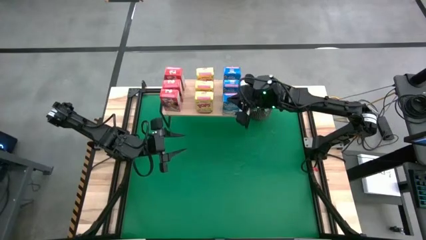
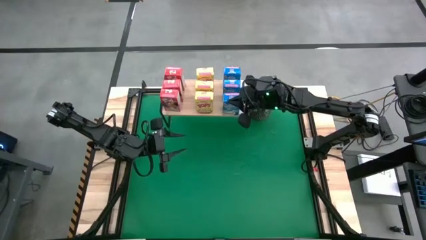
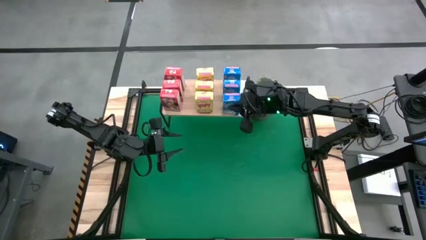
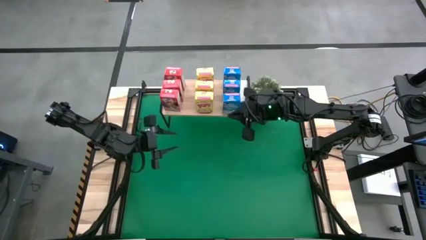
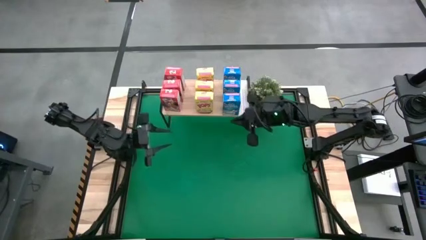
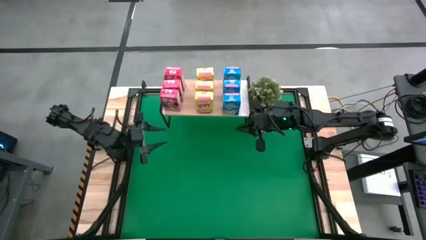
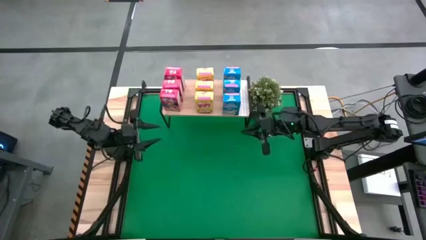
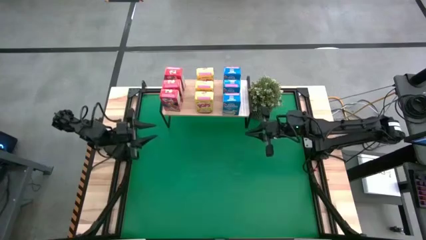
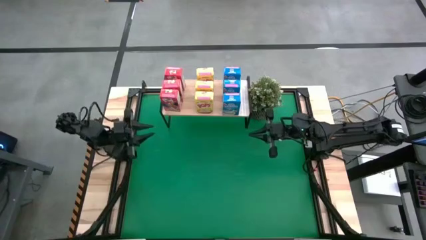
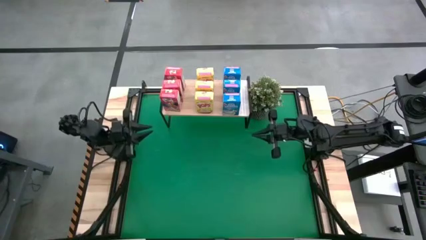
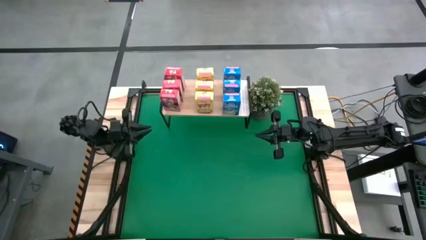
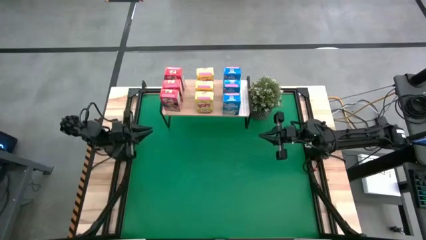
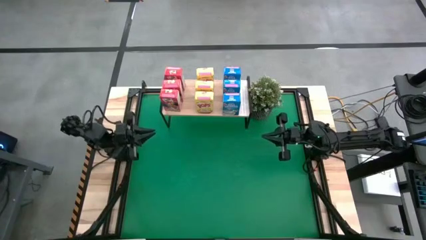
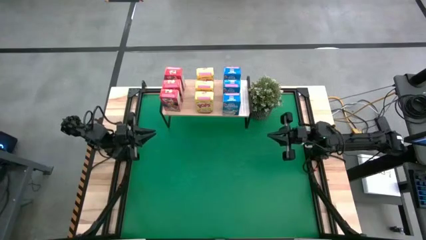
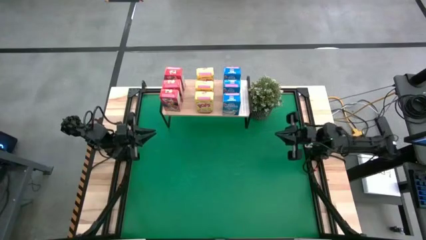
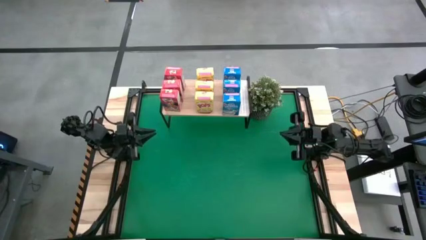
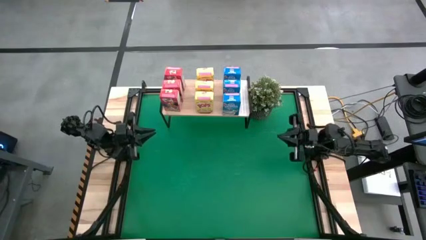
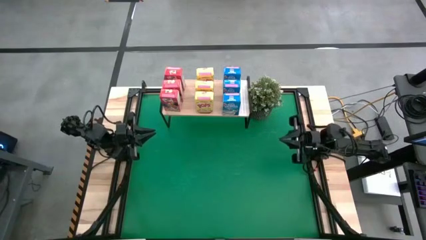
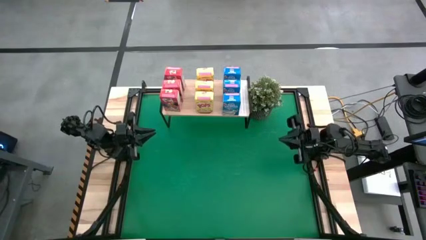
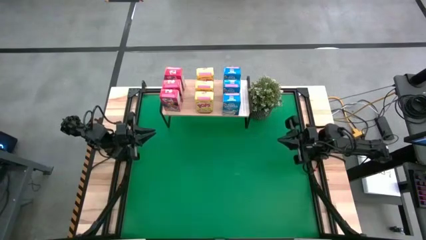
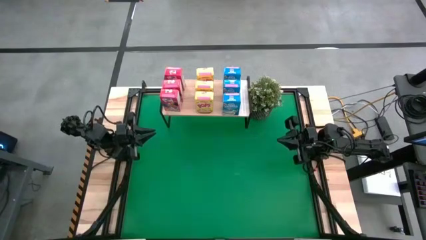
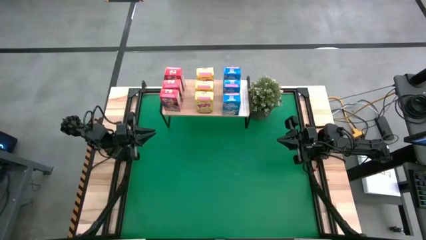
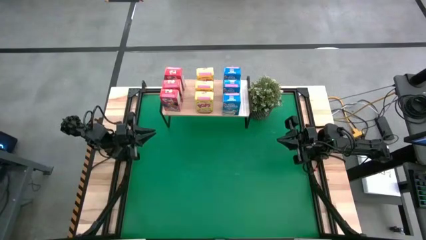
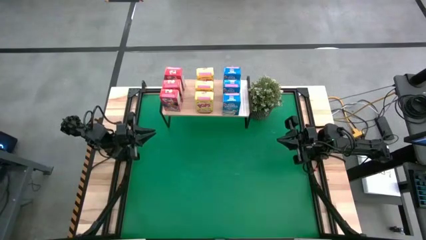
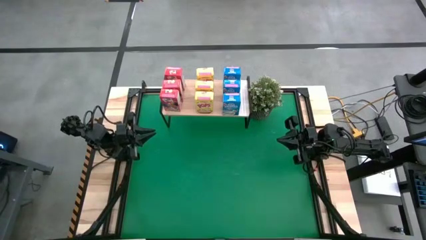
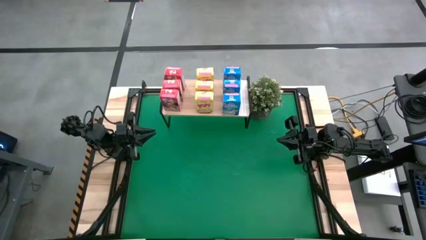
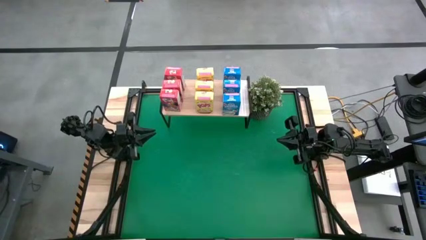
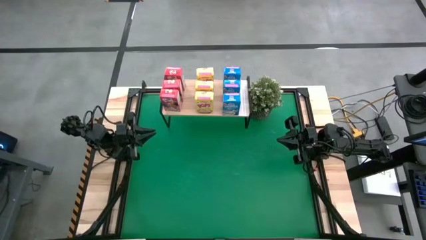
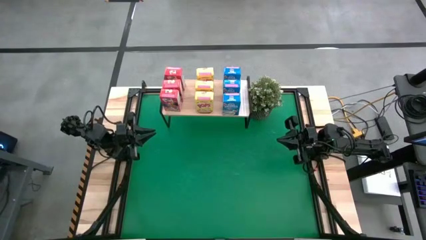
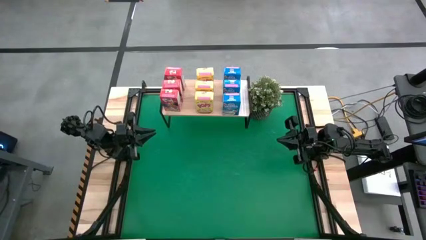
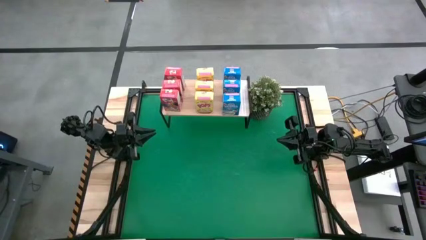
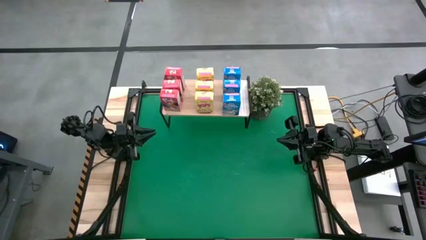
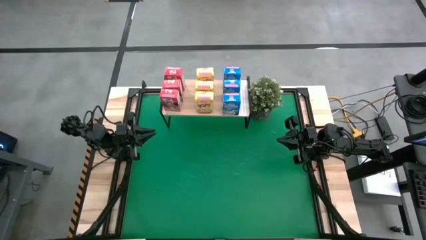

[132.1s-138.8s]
Task: Stack cereal on shelf
Return to Home Position

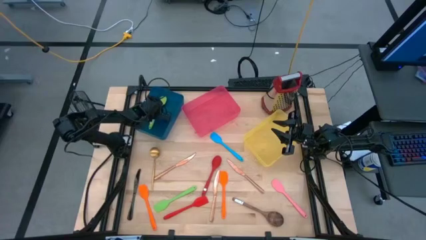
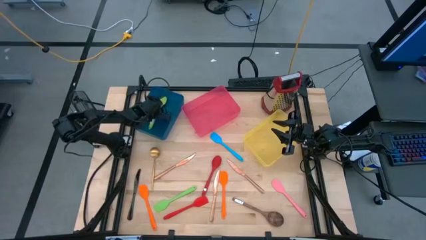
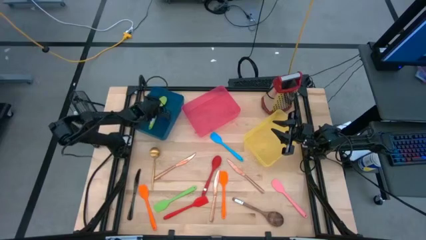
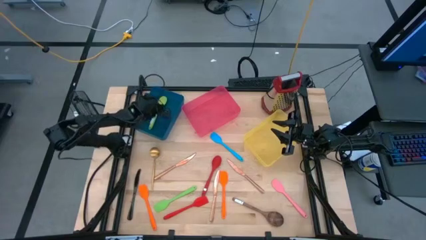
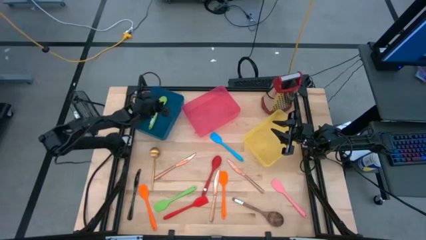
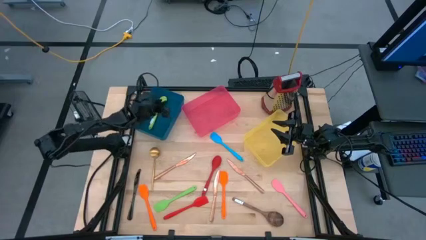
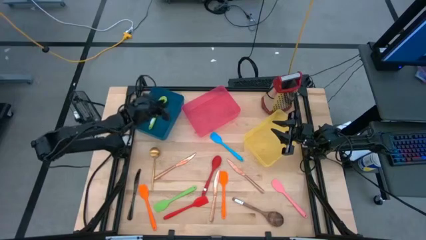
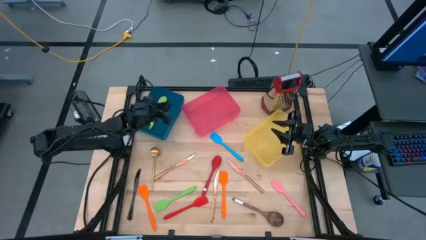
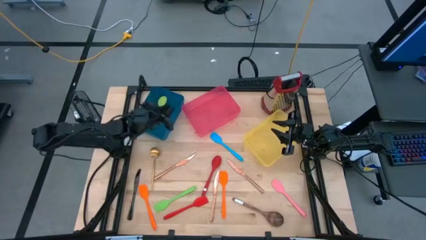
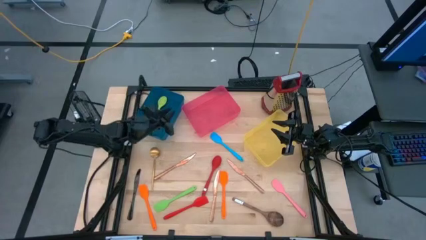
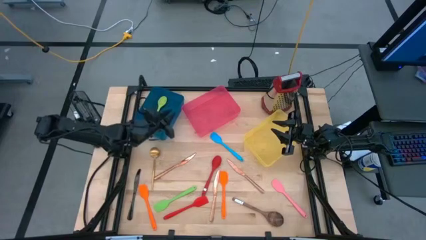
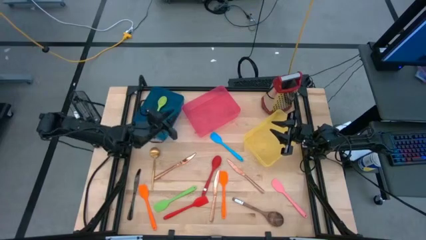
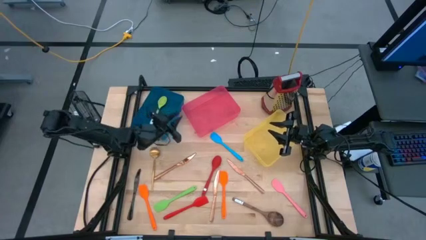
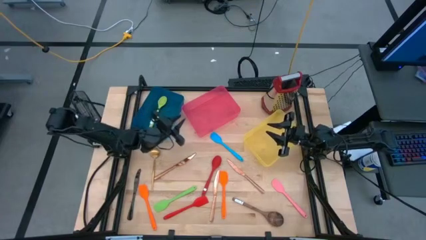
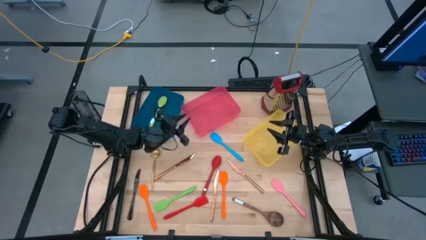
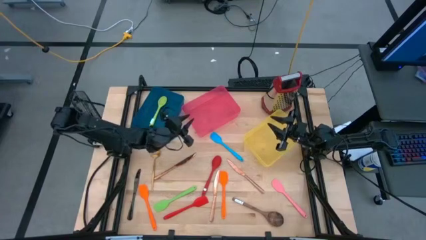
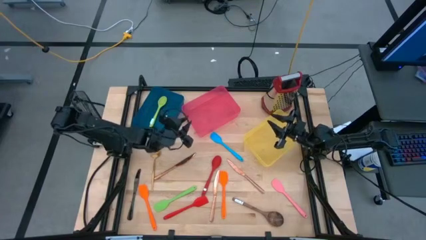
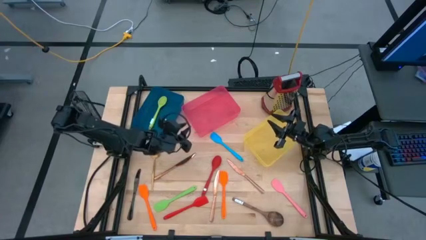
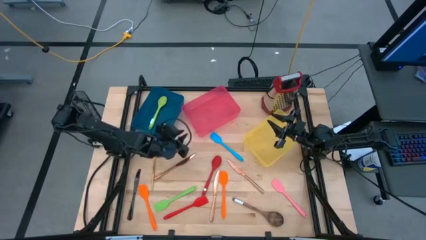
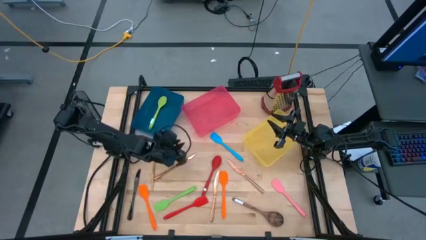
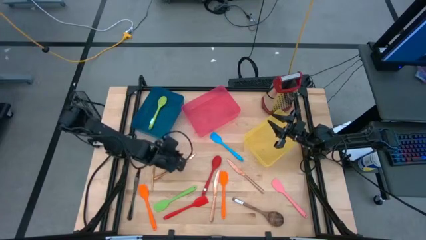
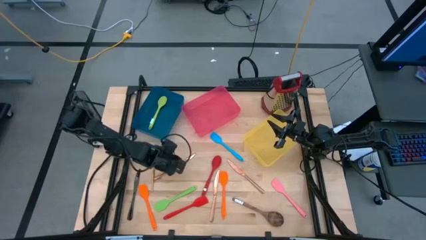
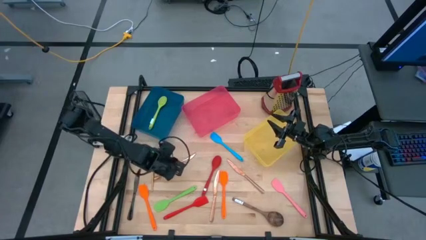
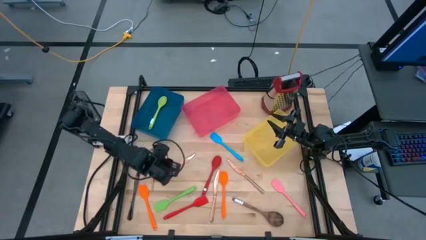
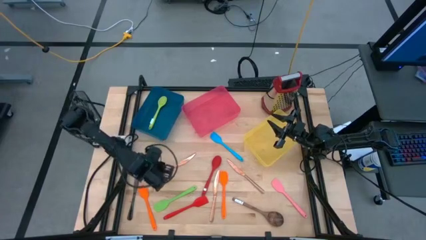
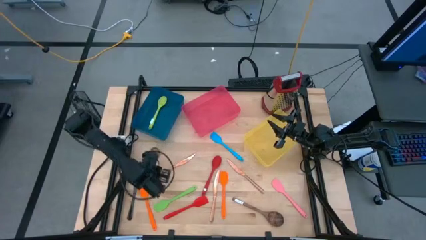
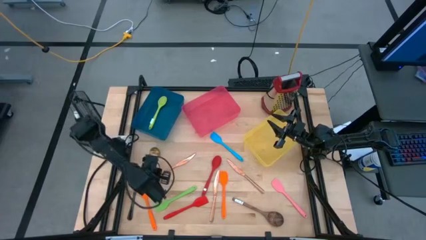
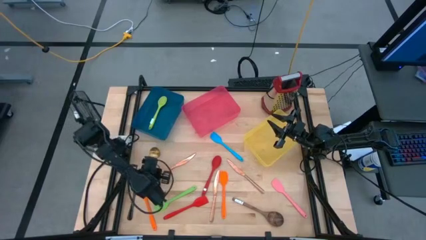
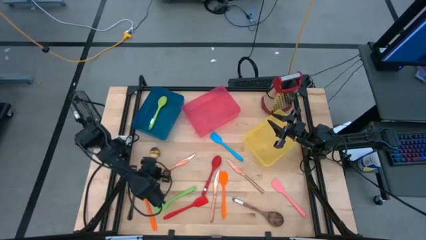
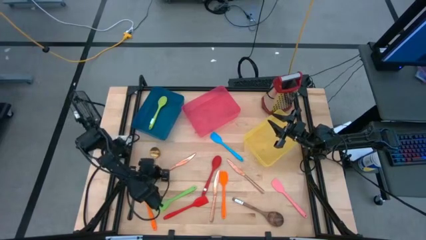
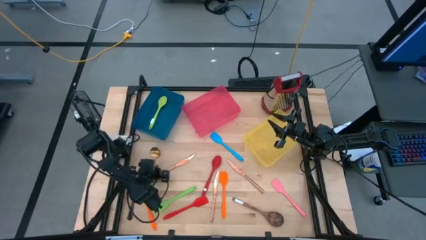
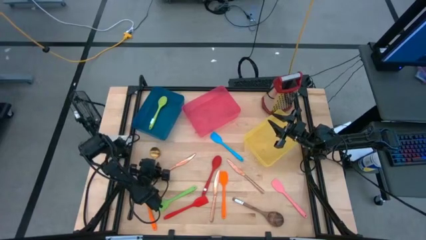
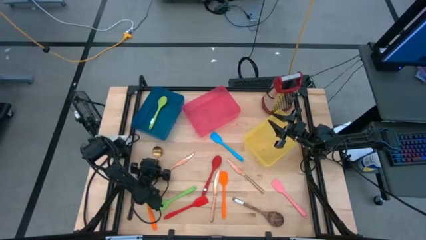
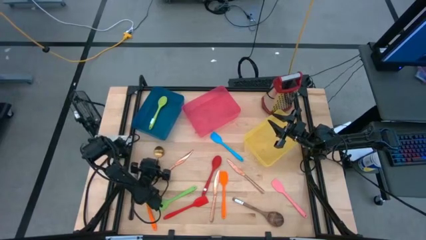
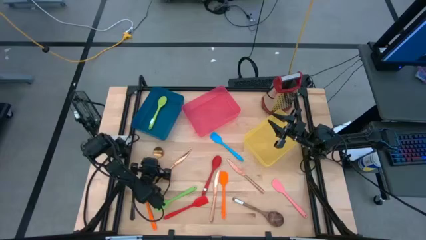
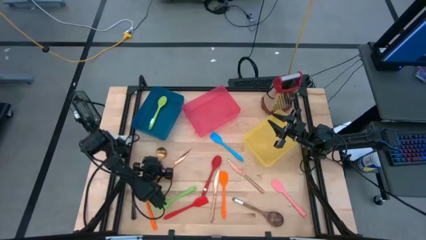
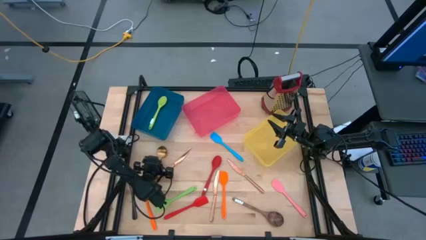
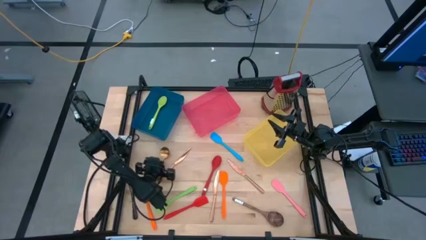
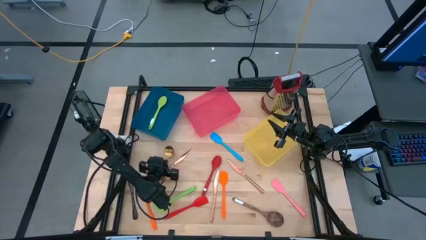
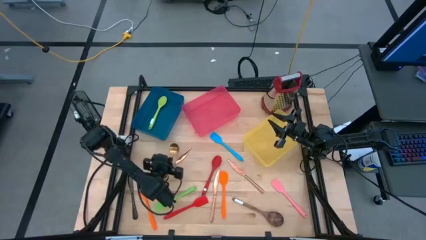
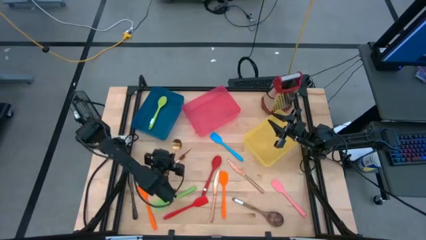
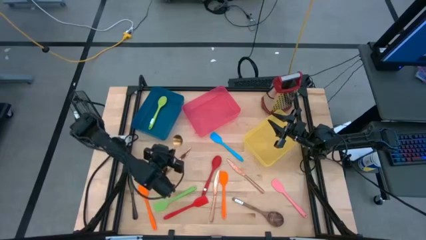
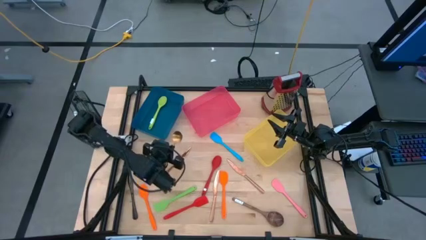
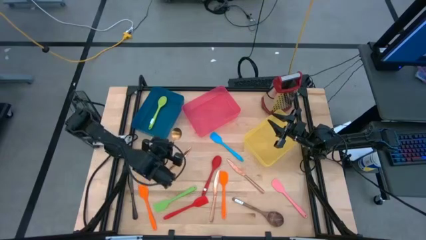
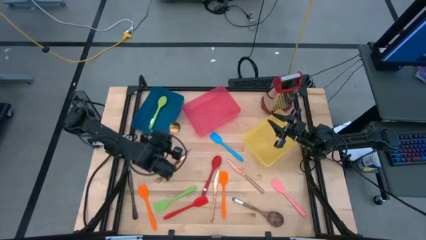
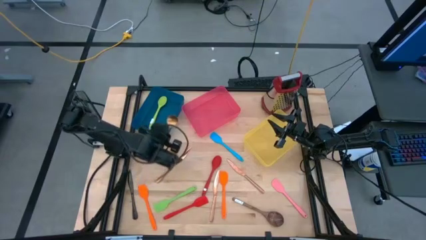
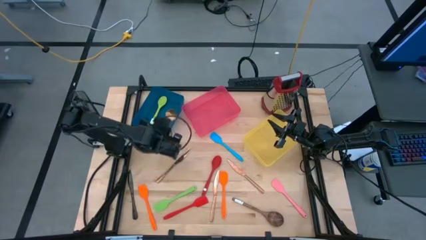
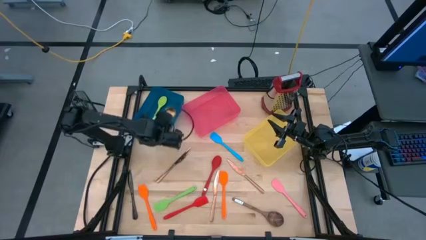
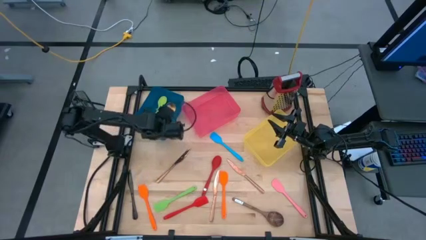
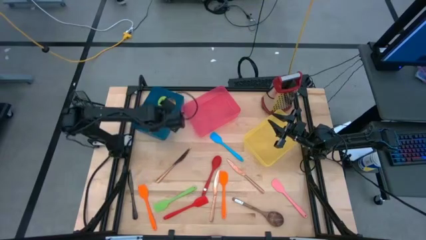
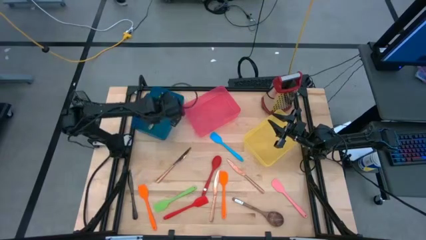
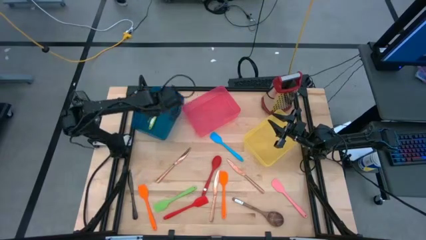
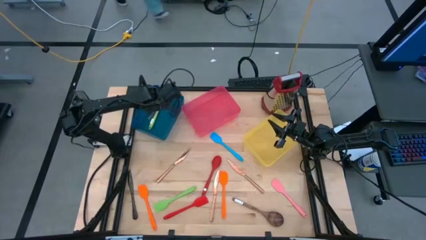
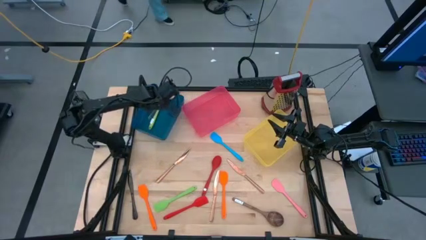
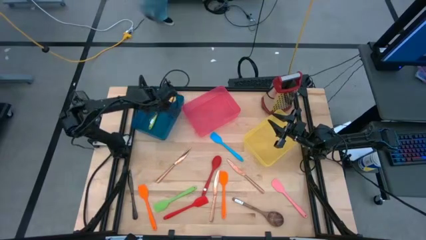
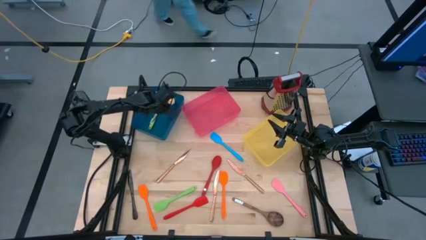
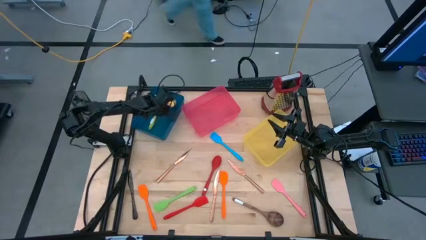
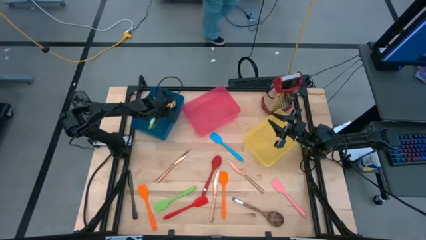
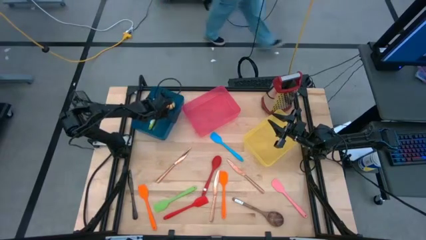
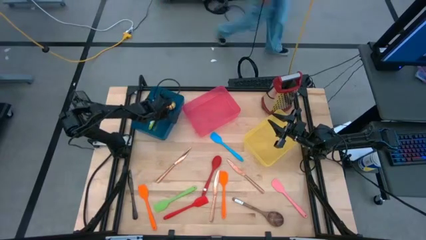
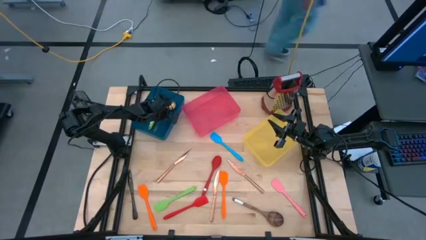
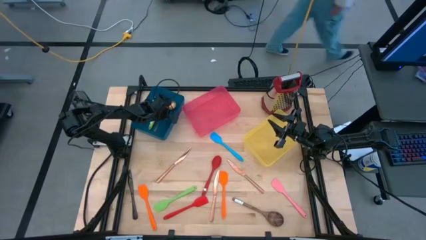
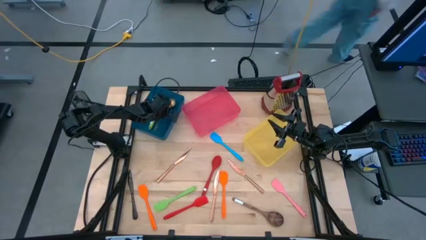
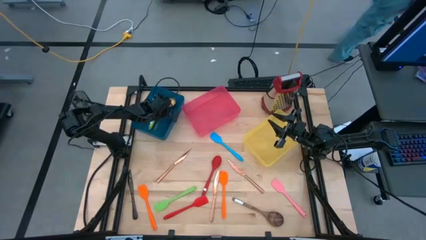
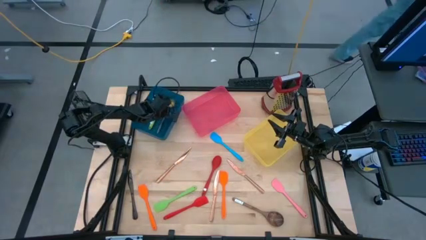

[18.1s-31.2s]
Task: Pick & Place Kitchen Items
Put the gold spoon into the blue bin
